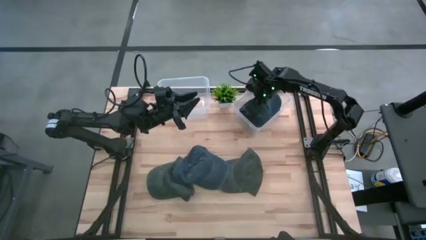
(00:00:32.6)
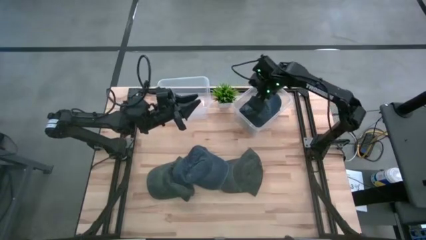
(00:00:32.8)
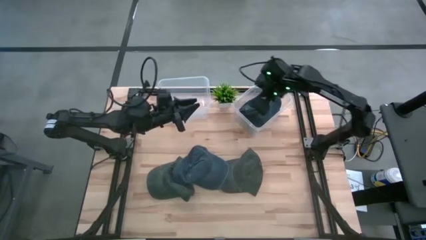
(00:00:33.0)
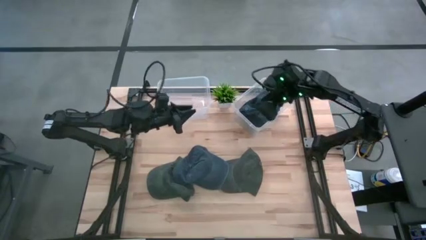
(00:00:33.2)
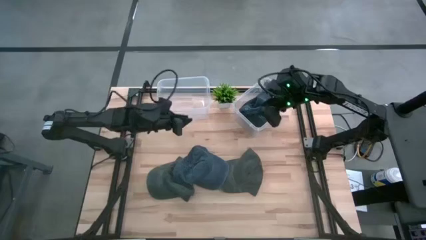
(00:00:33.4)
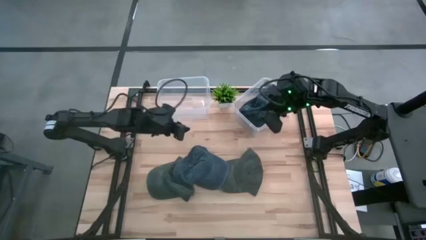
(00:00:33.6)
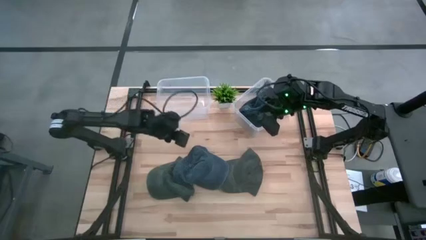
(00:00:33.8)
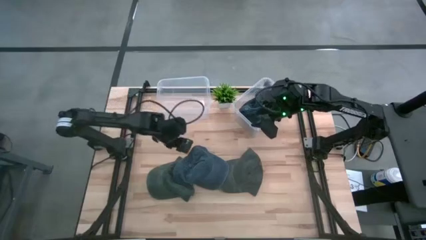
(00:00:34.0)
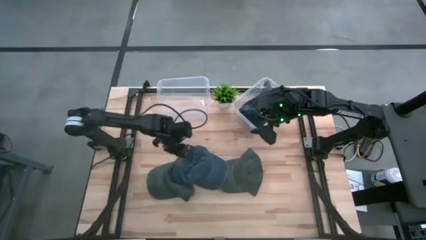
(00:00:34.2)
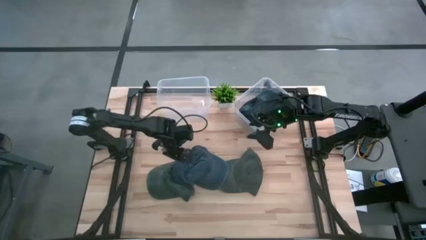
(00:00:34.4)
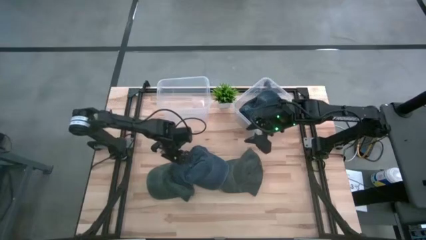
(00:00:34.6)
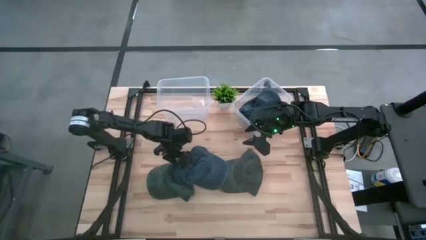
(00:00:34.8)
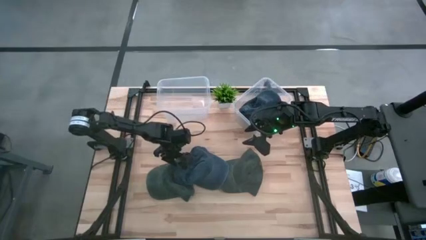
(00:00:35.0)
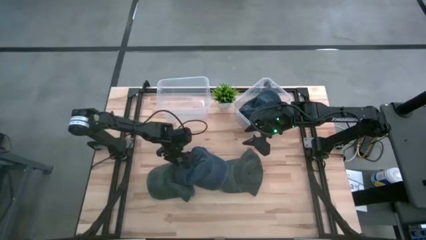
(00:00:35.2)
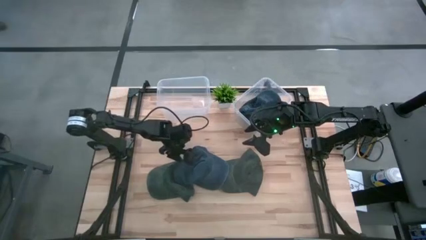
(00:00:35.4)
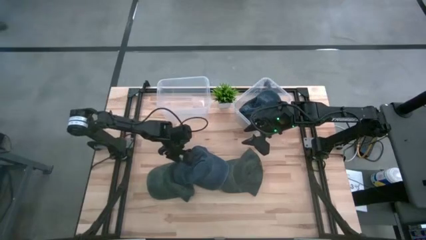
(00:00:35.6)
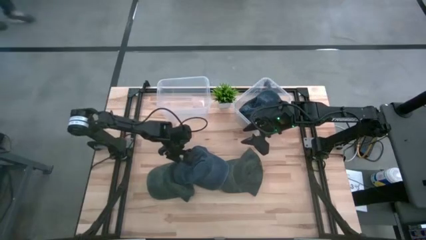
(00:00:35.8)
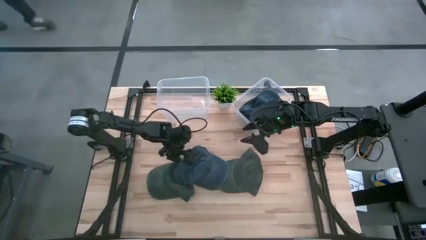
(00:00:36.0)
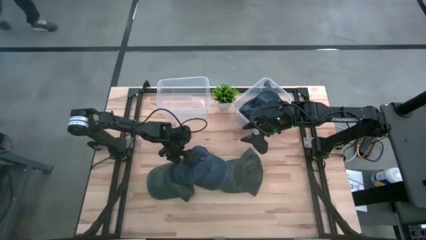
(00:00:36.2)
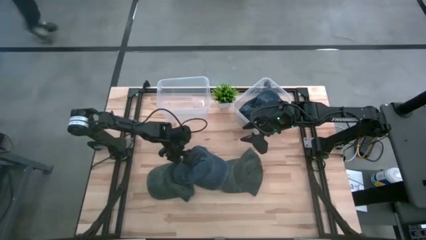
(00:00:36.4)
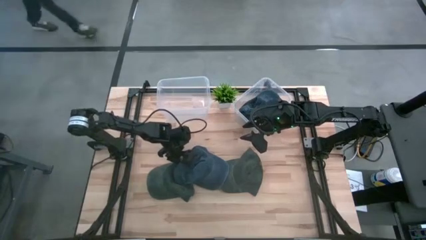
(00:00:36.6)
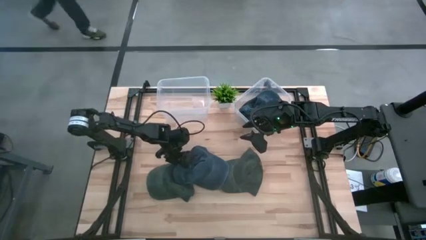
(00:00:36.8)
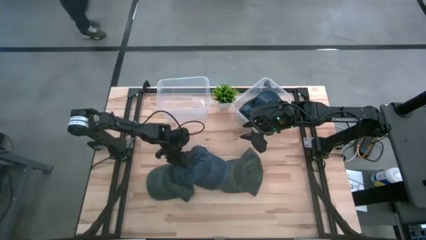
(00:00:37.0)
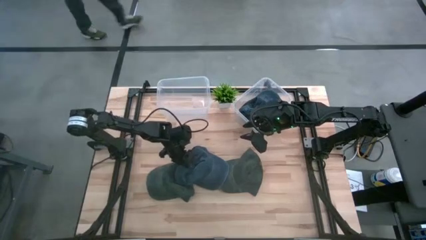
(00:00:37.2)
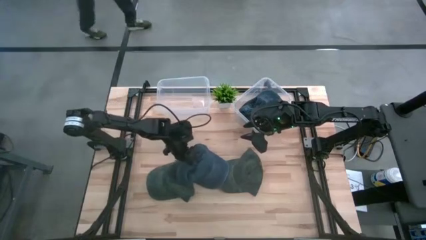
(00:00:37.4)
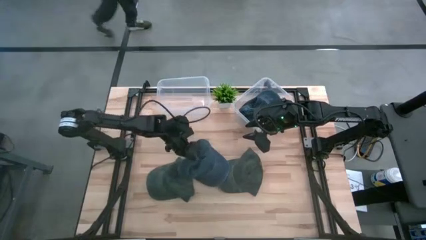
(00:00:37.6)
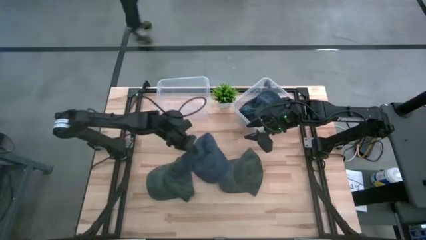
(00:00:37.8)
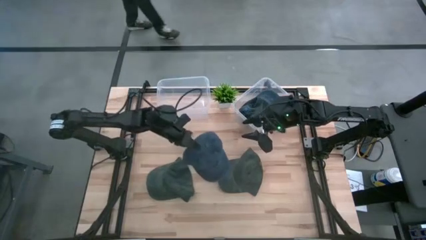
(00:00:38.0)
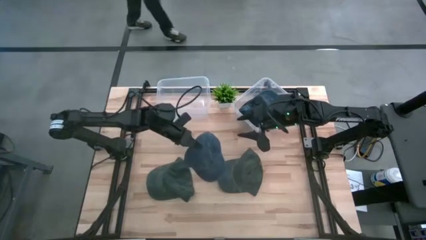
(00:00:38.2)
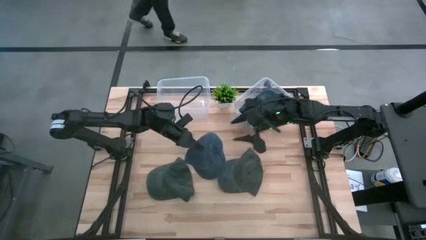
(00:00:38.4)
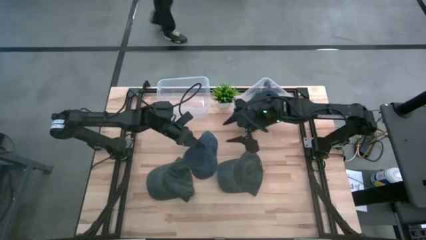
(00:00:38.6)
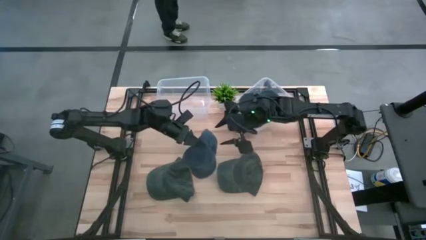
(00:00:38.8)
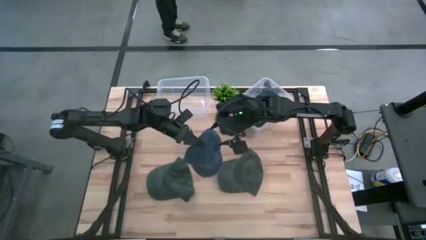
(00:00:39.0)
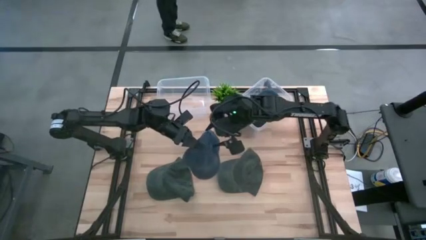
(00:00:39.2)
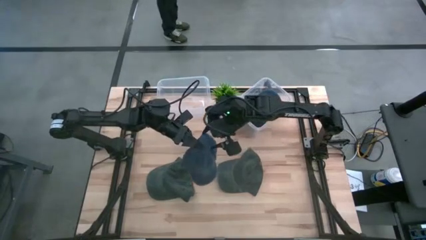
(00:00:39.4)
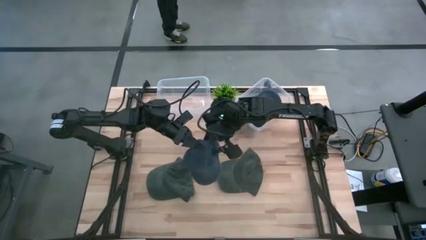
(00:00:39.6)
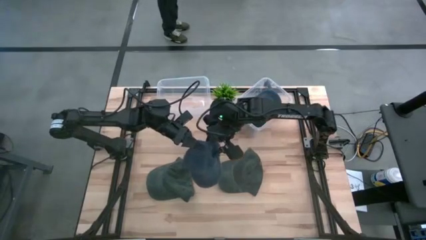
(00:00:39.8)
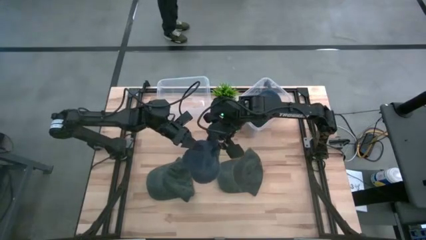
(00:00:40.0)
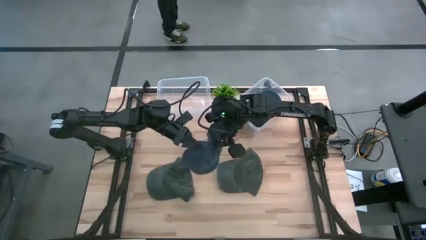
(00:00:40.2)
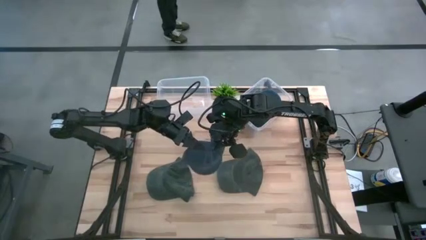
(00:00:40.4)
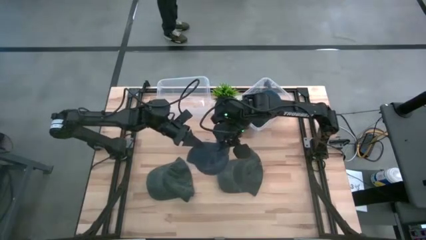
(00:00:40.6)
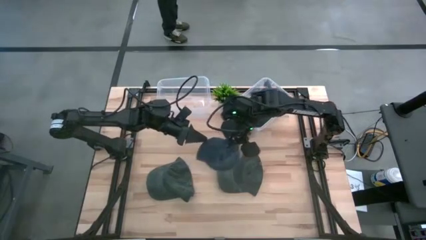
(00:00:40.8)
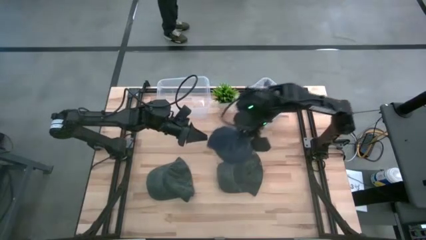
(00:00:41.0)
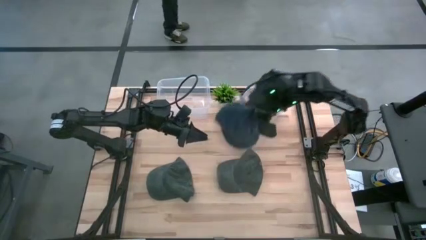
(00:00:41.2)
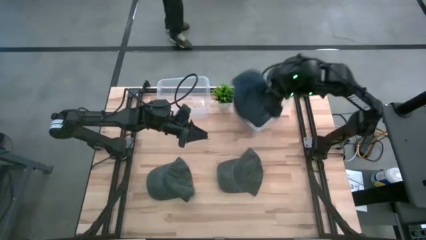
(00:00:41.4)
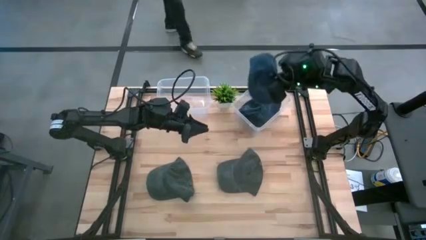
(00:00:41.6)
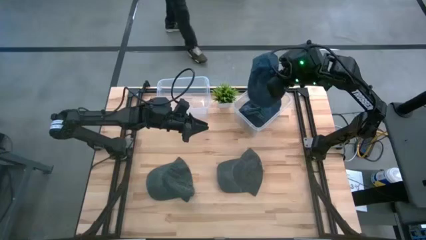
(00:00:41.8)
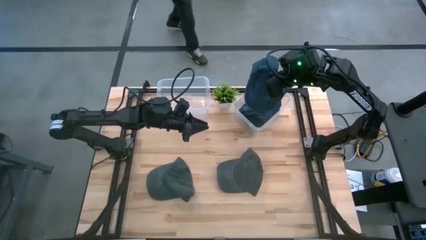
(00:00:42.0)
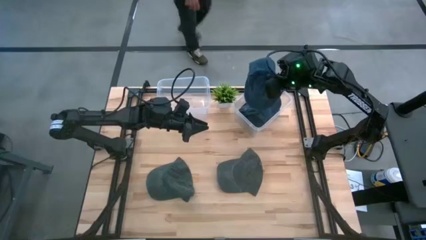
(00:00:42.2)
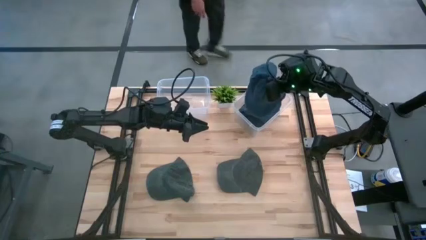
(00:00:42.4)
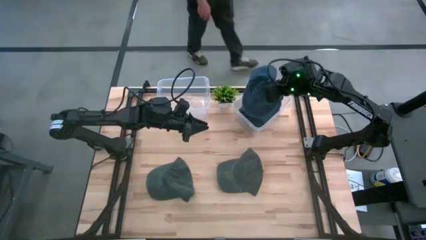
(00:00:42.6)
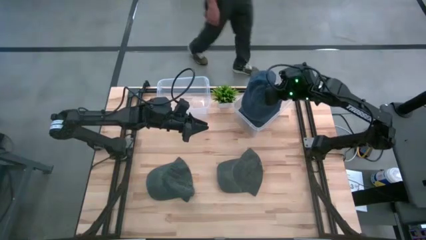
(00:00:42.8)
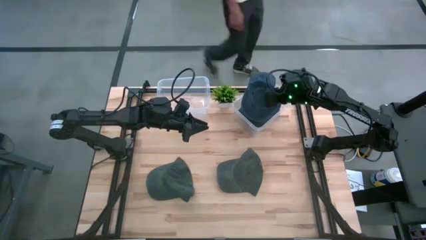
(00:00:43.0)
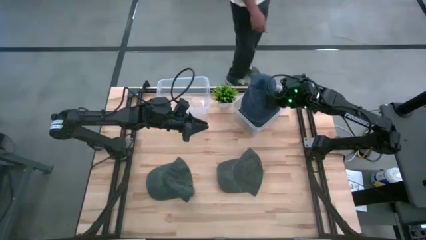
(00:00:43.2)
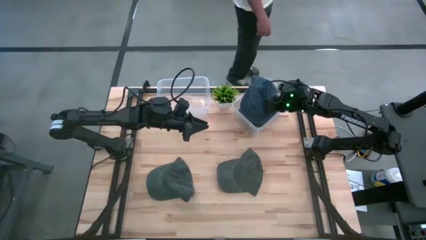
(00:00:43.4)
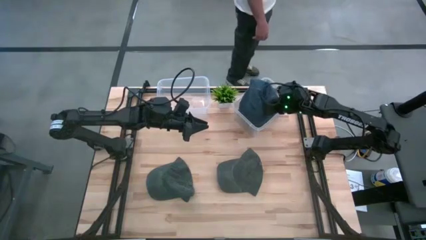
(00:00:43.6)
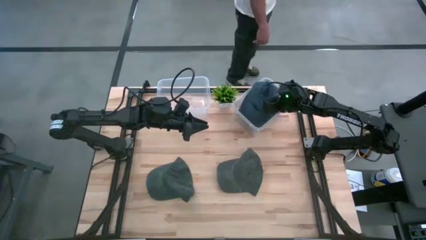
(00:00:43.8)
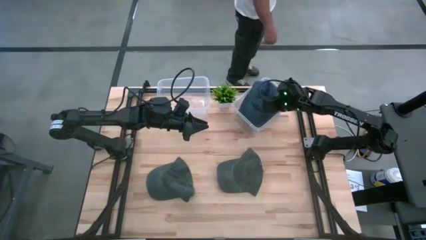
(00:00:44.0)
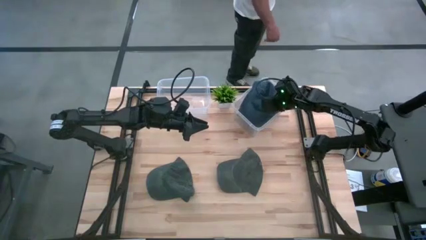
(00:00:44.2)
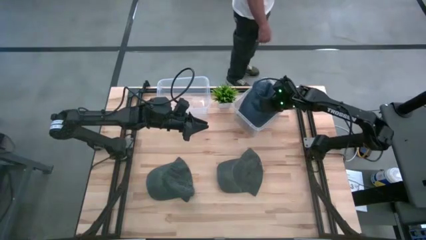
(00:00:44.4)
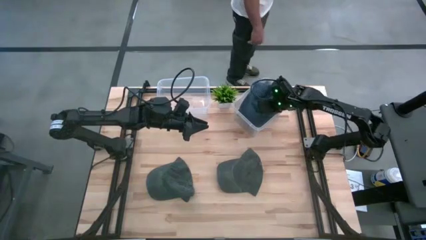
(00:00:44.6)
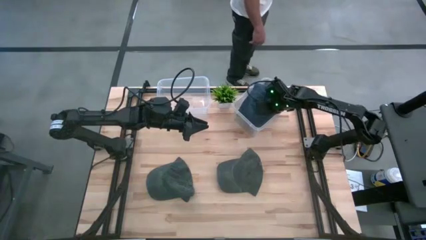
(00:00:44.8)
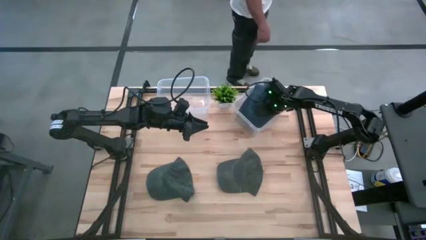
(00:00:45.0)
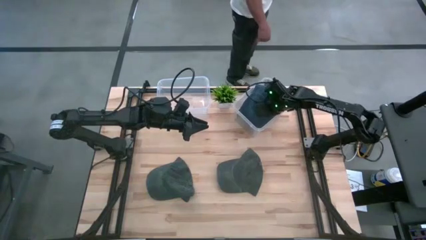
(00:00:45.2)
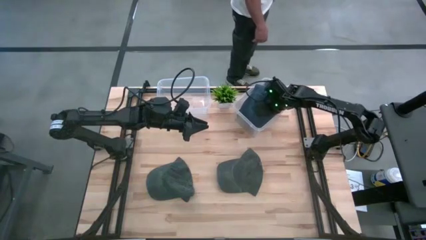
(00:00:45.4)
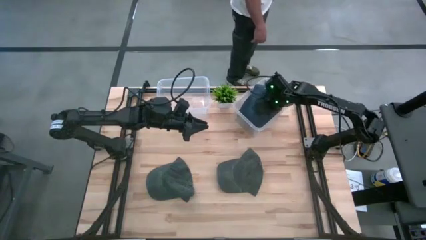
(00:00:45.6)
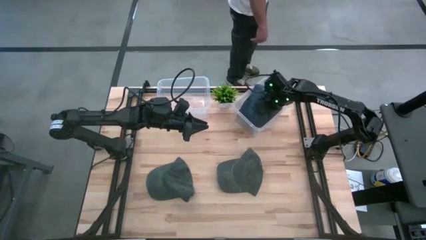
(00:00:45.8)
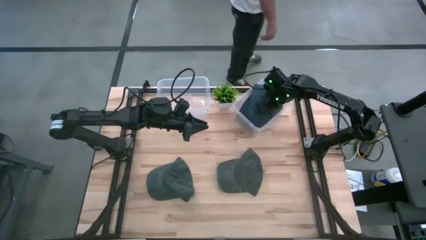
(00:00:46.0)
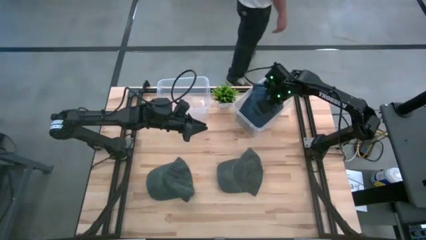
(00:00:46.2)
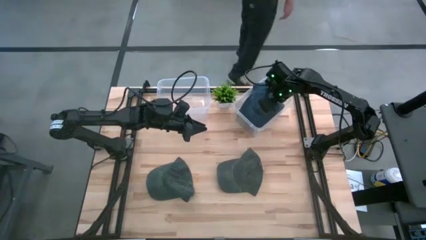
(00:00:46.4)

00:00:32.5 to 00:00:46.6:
Task: Pick and place caps into container
Put the blue cap into the right transparent container
